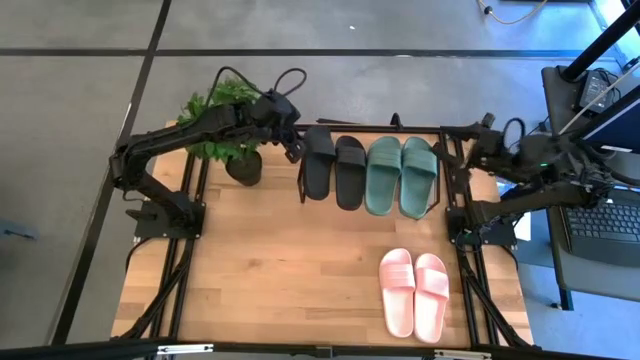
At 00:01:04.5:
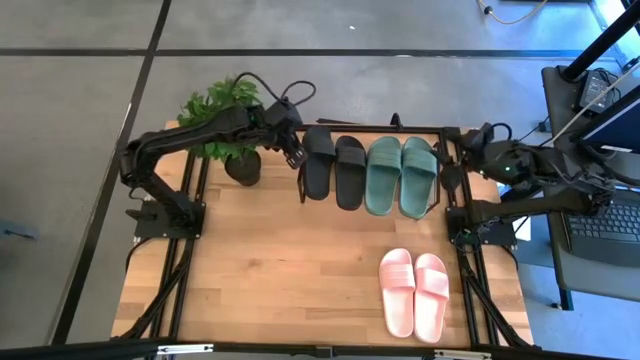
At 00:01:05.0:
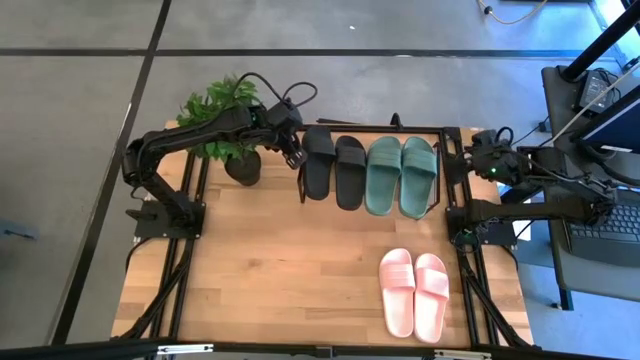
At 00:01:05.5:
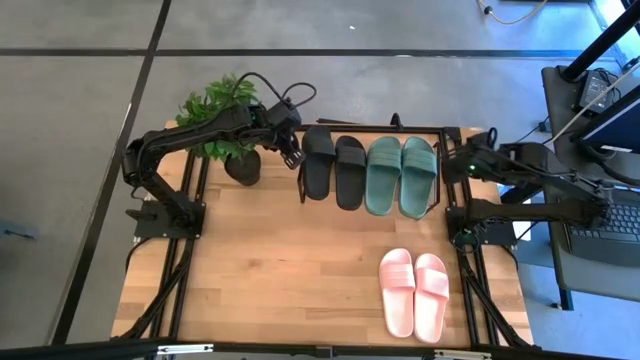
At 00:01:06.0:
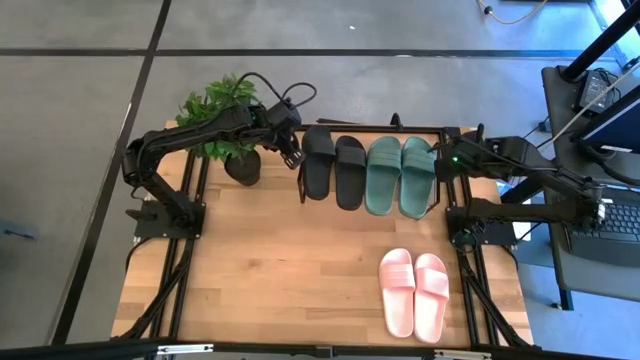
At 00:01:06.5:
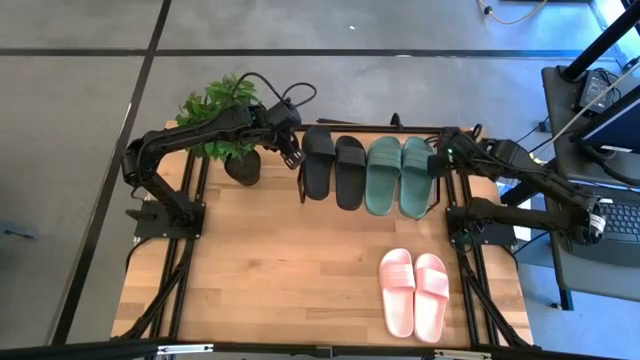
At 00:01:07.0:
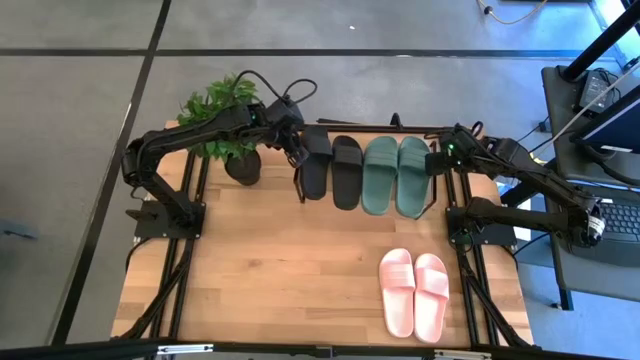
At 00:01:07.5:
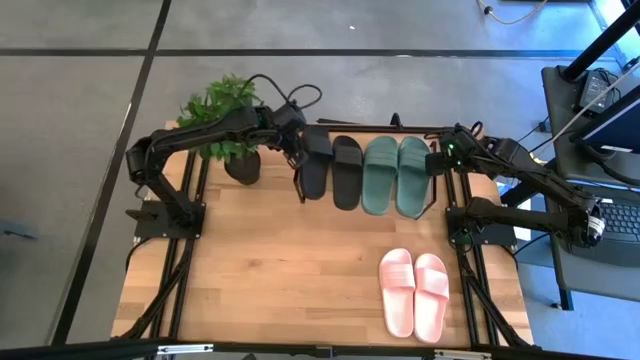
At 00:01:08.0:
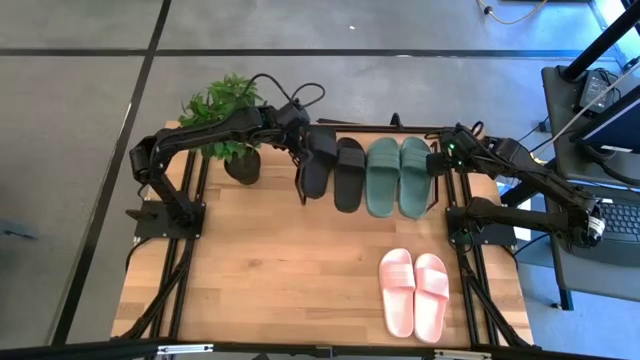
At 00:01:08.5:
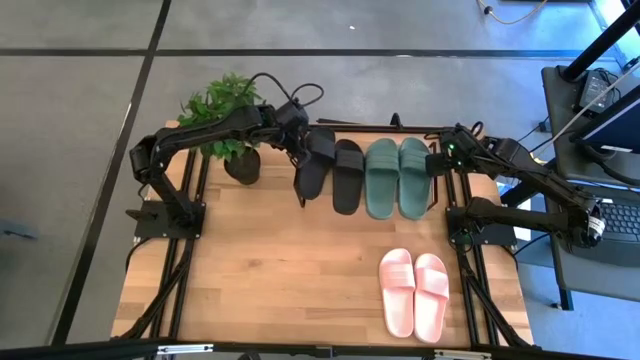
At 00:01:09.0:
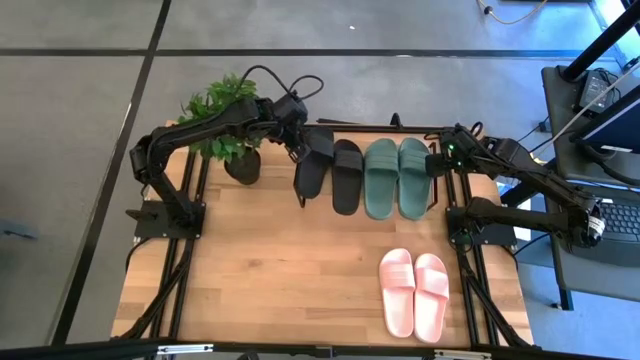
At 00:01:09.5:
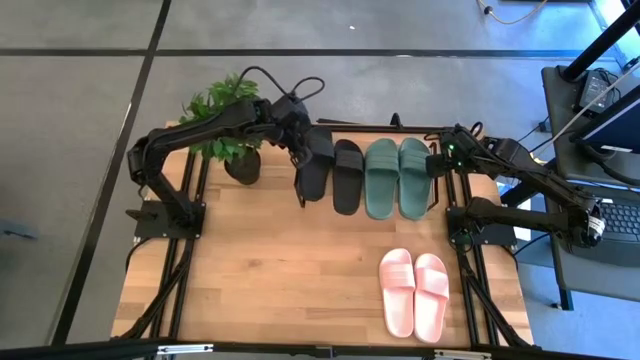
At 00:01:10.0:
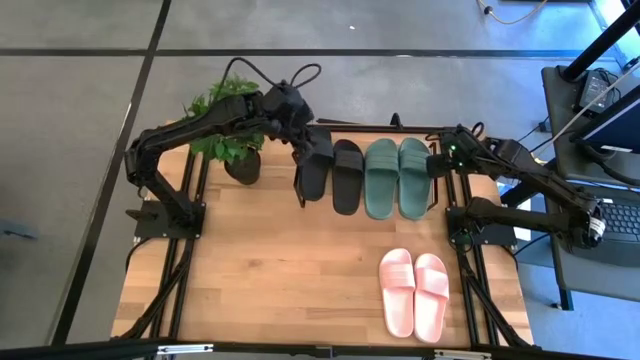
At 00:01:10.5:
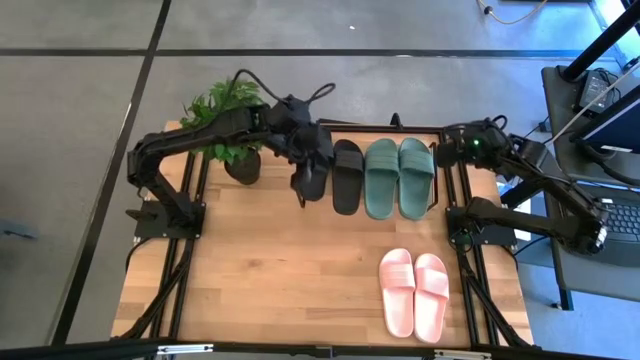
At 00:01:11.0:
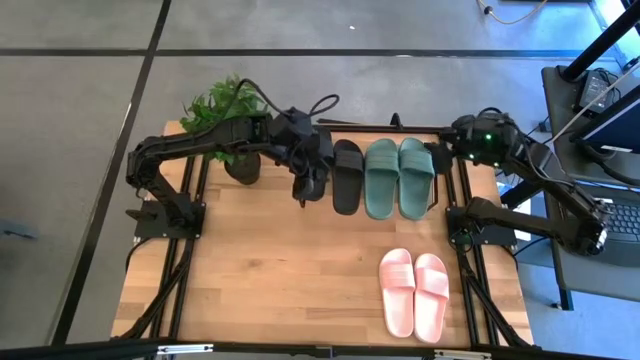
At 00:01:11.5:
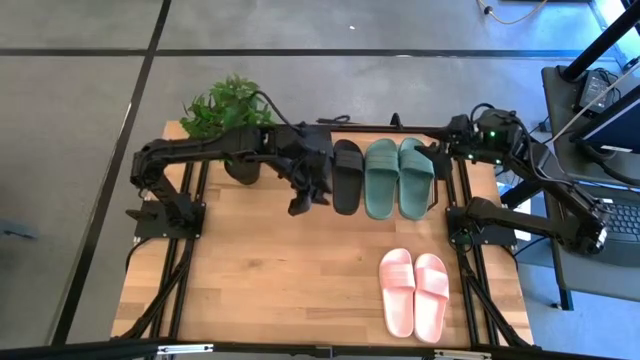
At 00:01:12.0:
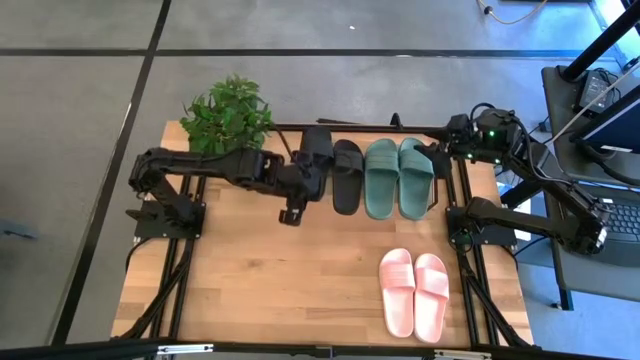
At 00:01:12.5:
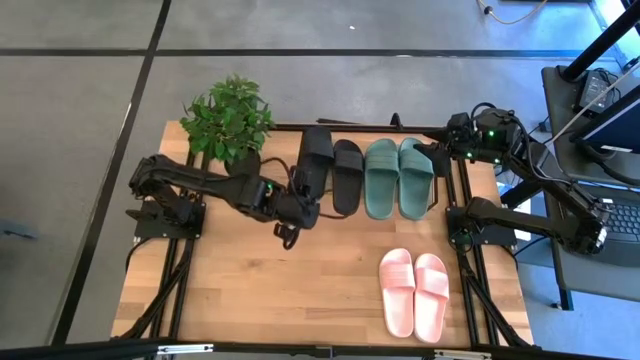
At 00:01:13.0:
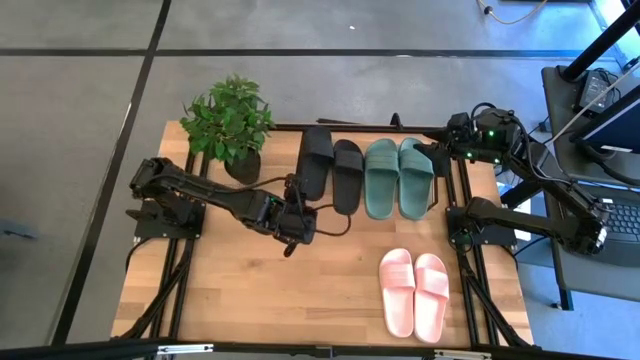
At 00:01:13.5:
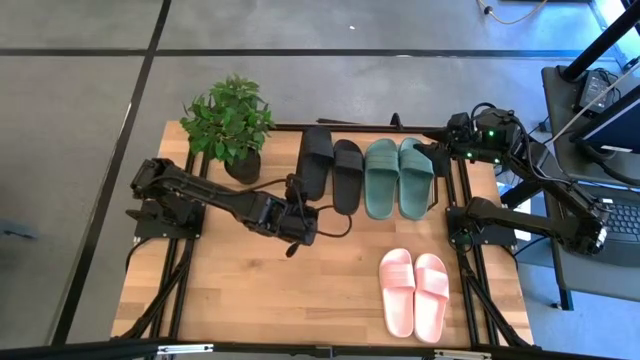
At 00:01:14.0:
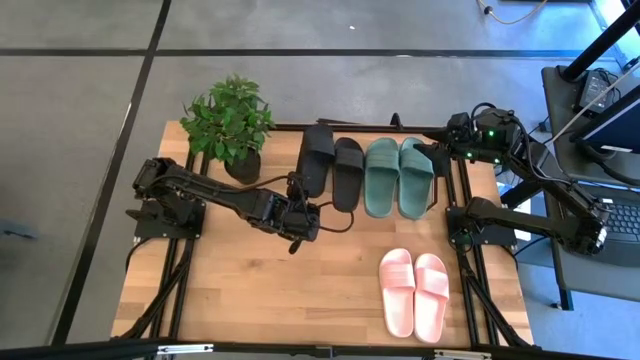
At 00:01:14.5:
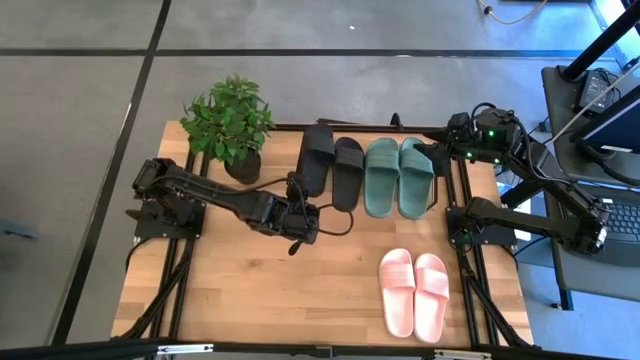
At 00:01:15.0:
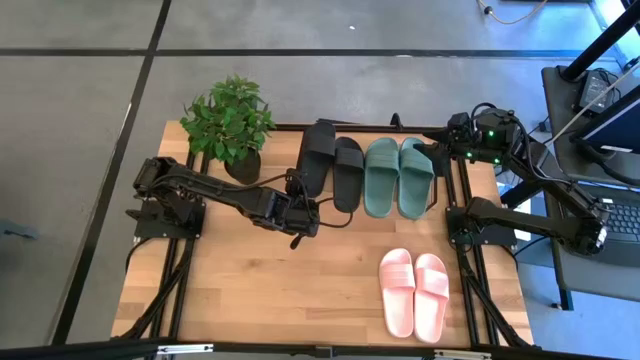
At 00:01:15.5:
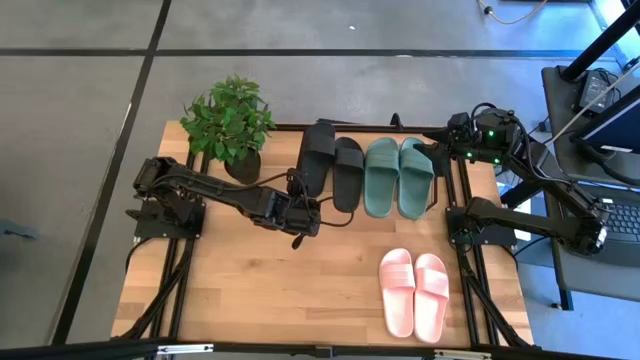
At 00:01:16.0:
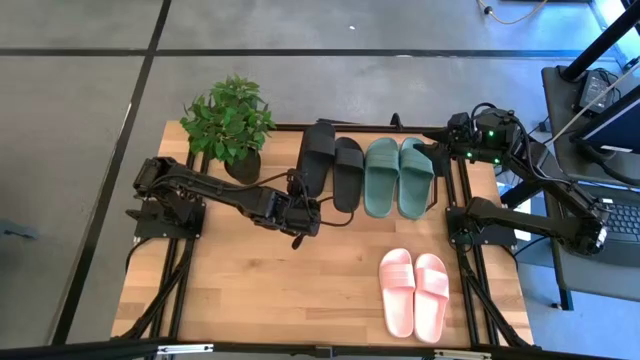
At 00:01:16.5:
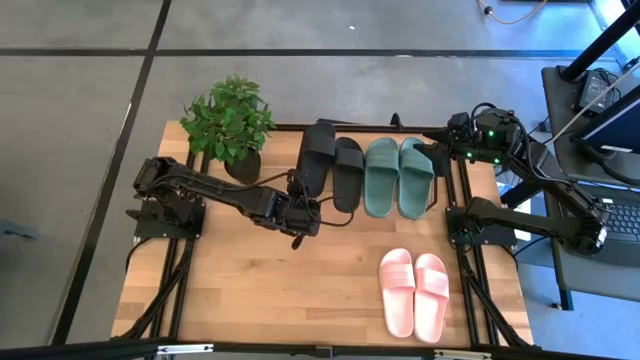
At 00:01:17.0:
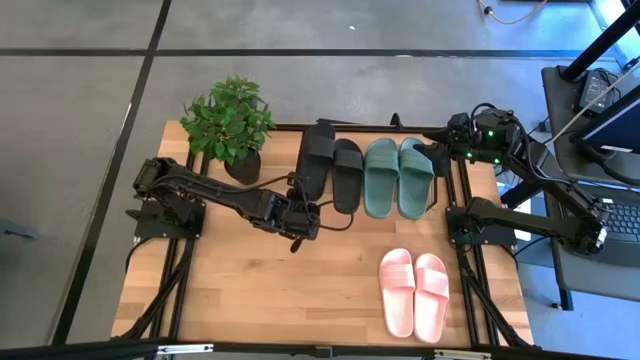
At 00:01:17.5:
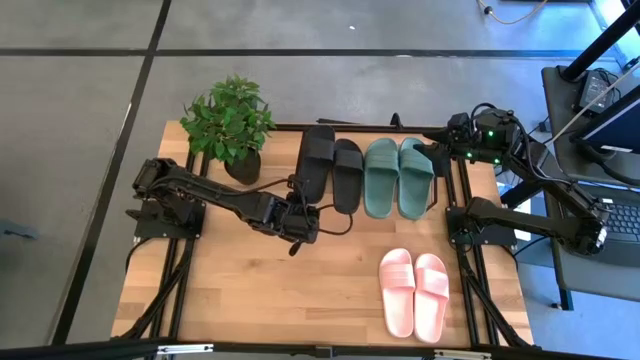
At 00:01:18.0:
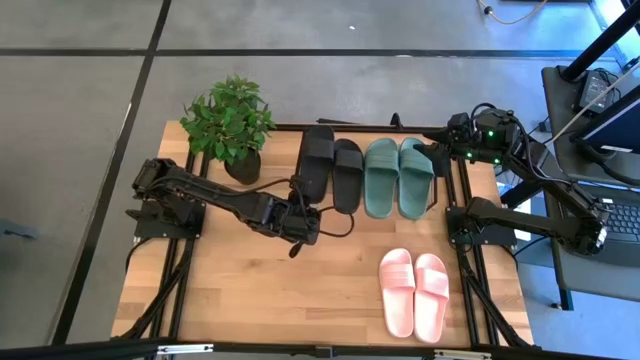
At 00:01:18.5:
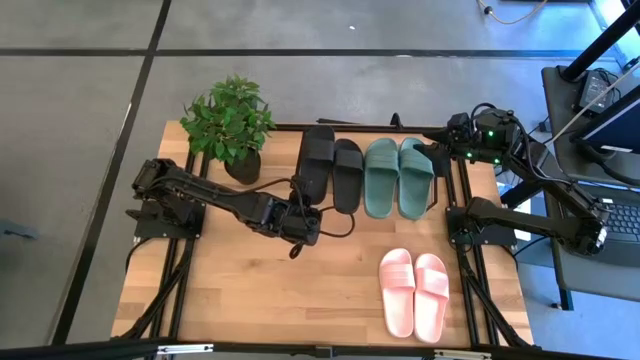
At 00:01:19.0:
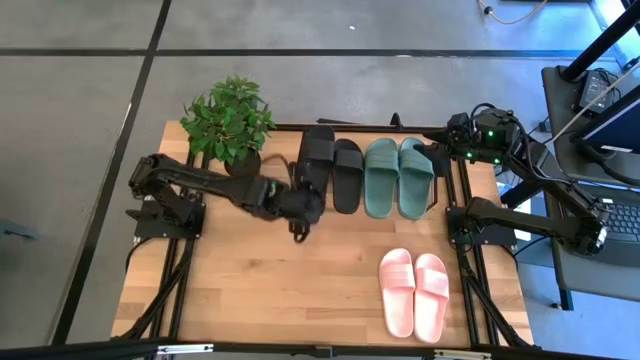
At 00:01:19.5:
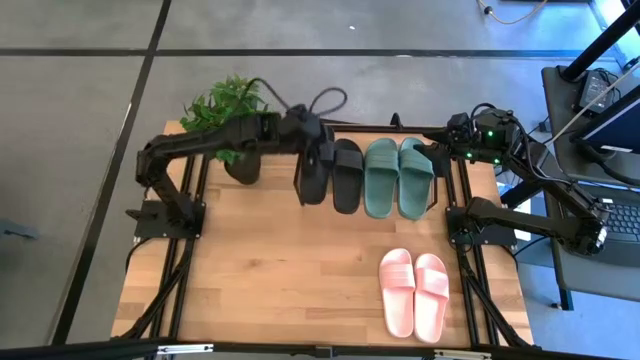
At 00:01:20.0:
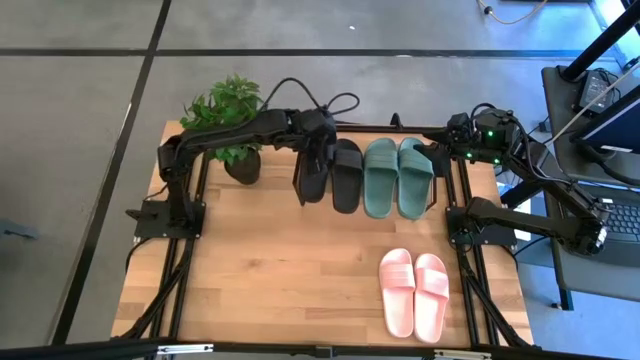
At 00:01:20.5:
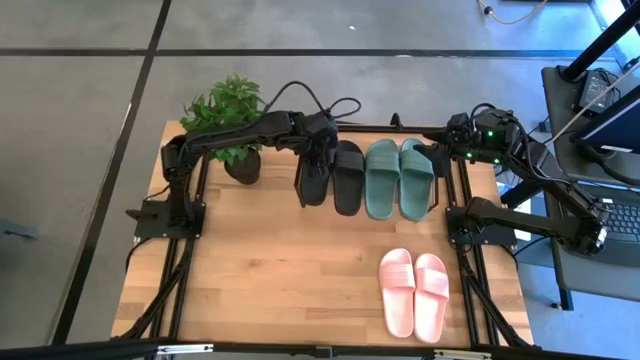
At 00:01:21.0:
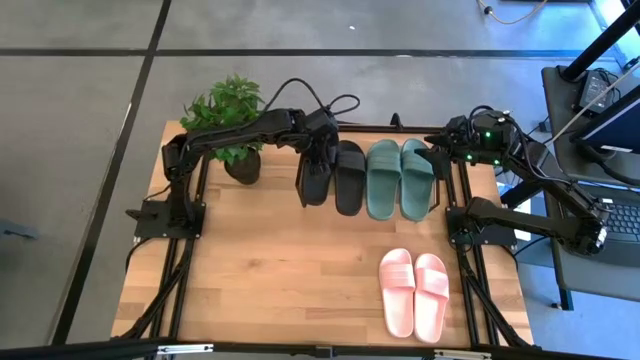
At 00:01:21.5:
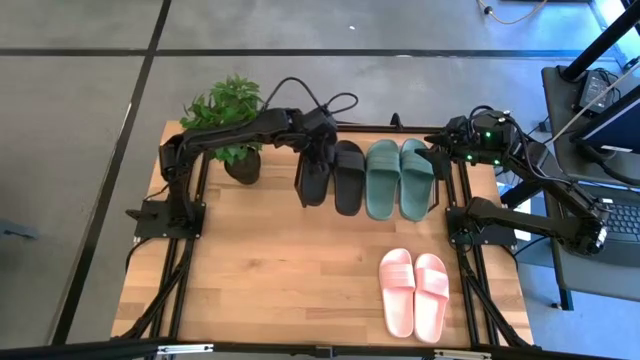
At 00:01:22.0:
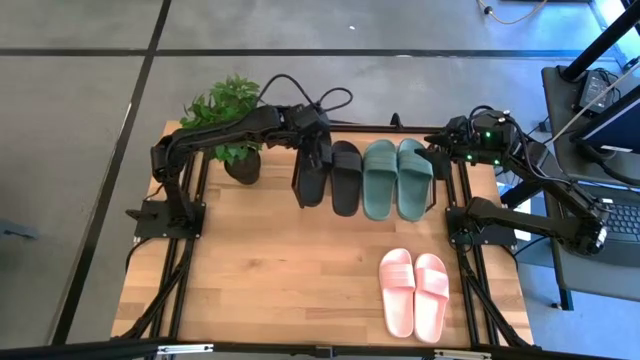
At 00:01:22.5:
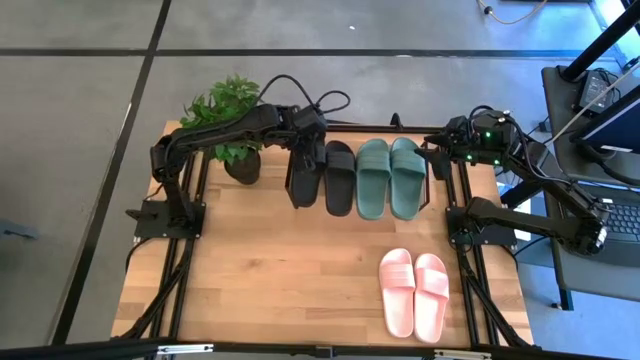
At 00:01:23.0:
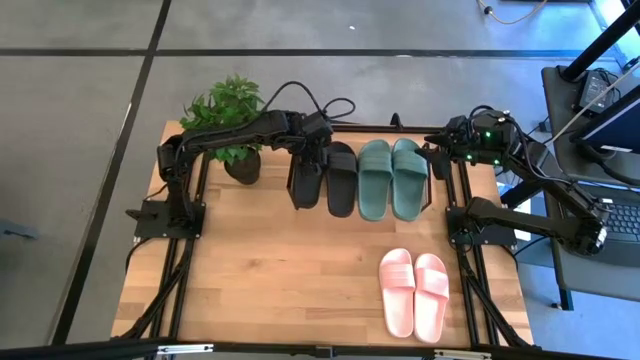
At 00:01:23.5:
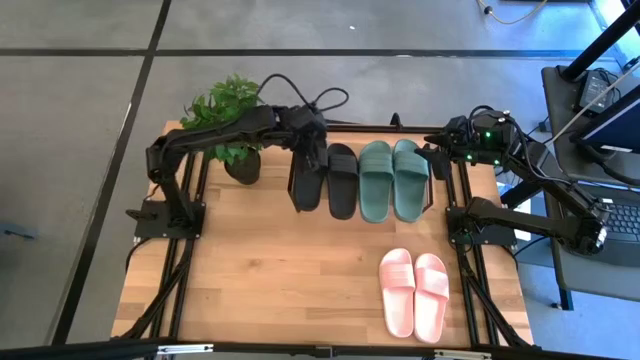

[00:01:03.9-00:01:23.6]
Task: Pick and place slides into the shelf
Put the black slides on the shelf
